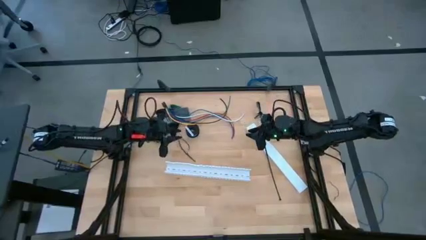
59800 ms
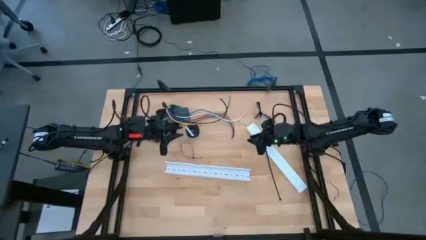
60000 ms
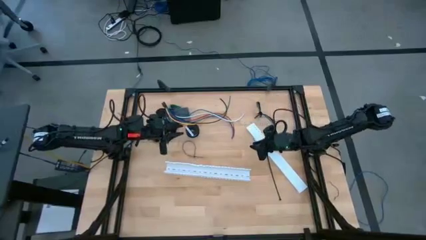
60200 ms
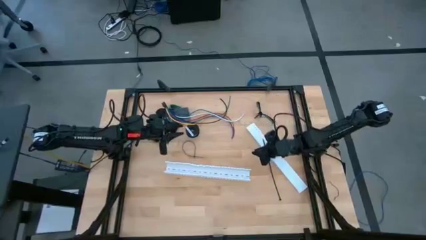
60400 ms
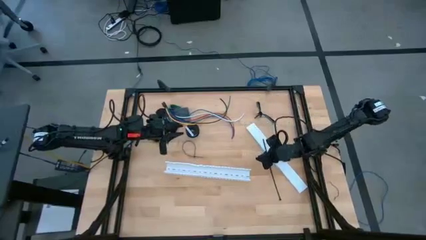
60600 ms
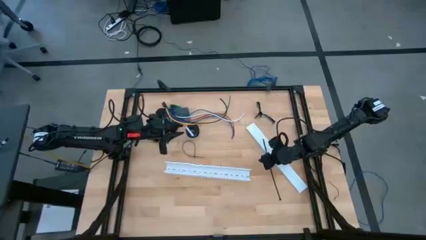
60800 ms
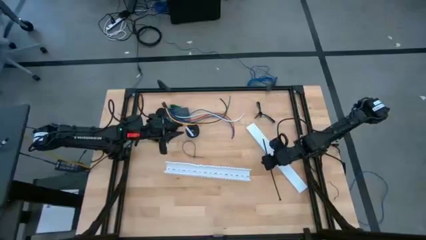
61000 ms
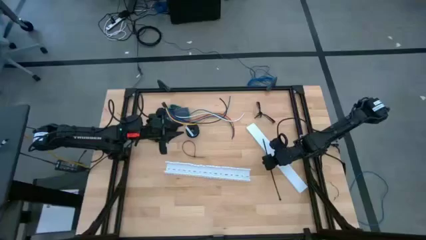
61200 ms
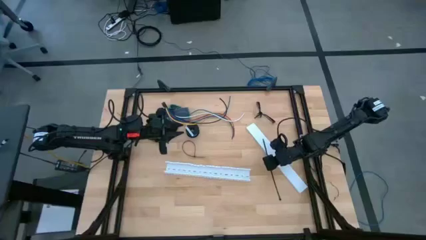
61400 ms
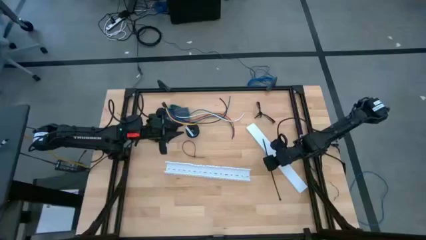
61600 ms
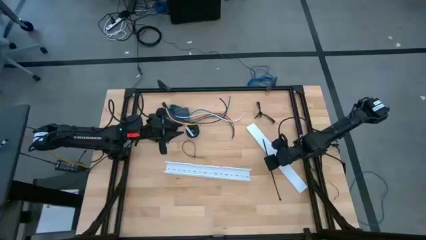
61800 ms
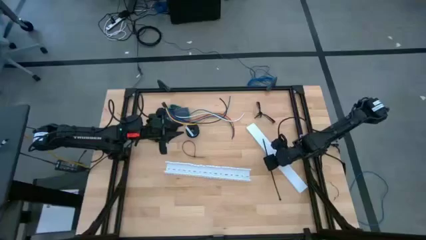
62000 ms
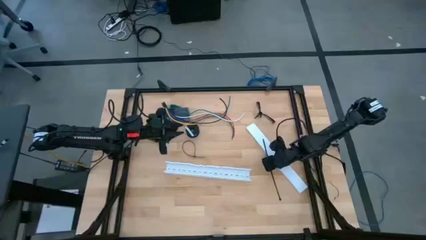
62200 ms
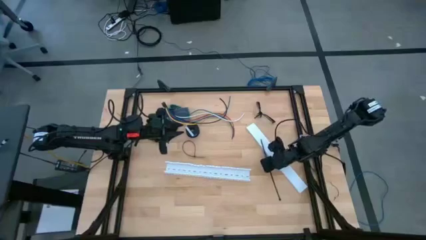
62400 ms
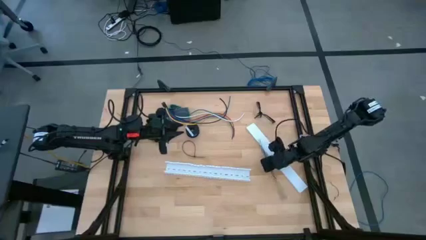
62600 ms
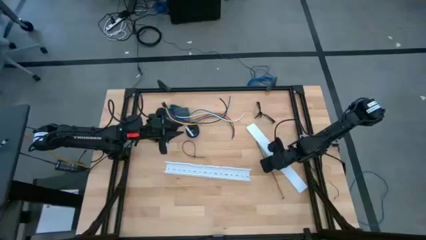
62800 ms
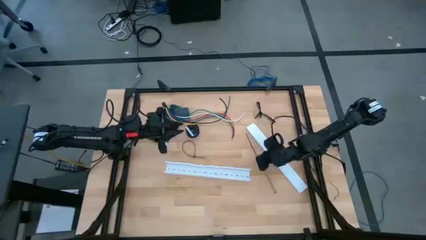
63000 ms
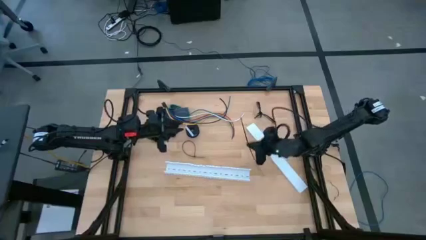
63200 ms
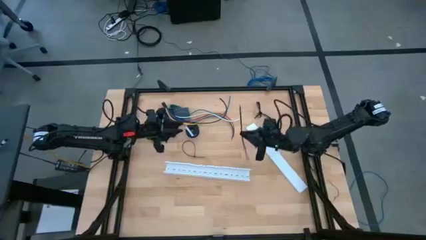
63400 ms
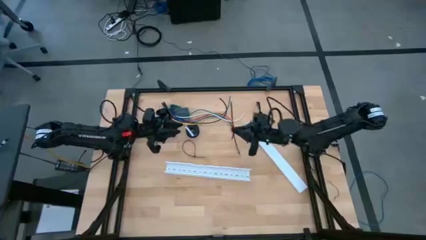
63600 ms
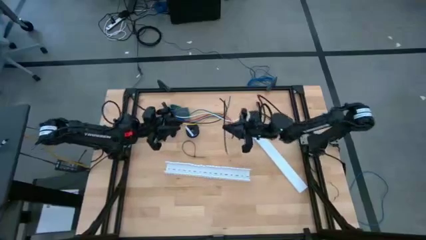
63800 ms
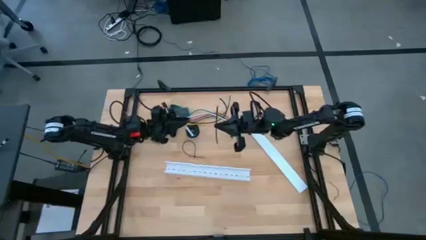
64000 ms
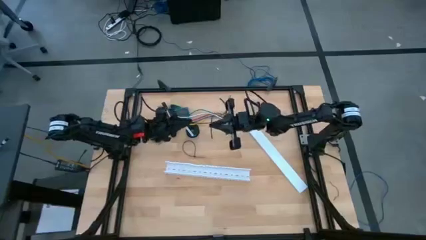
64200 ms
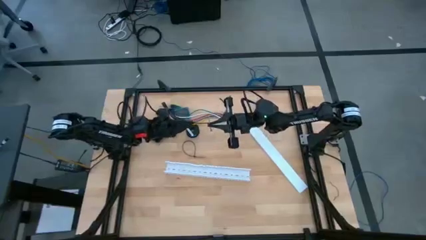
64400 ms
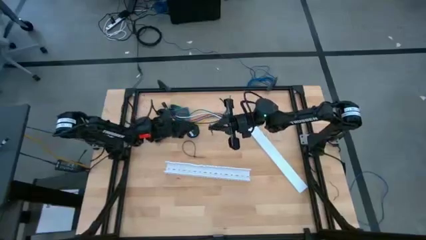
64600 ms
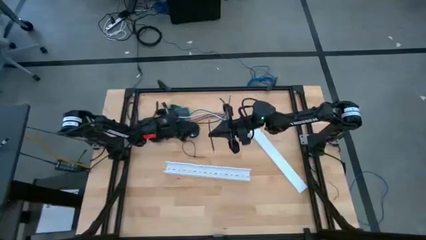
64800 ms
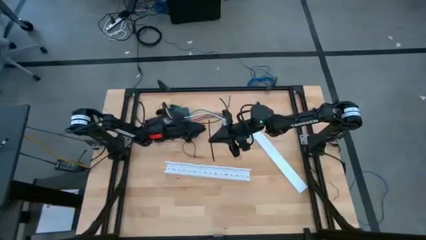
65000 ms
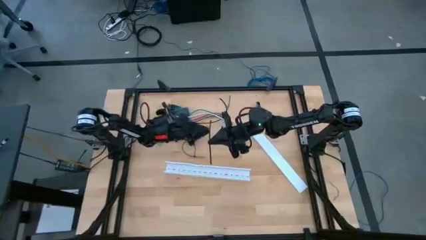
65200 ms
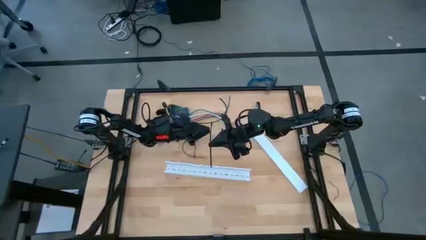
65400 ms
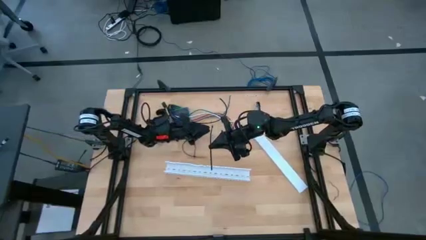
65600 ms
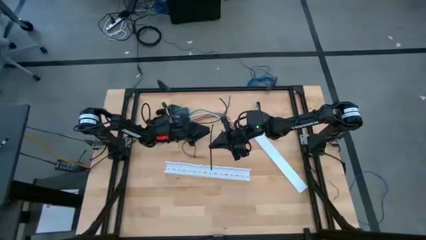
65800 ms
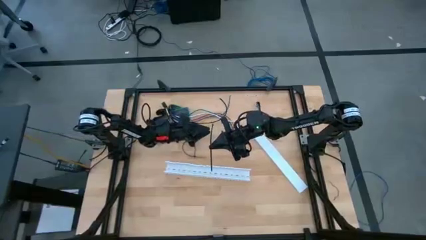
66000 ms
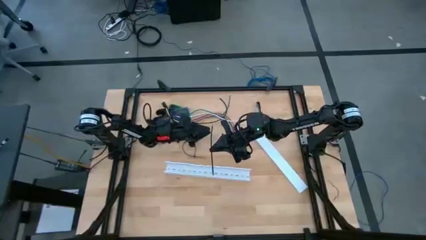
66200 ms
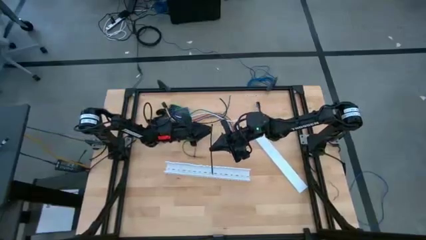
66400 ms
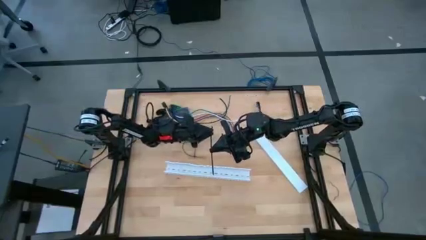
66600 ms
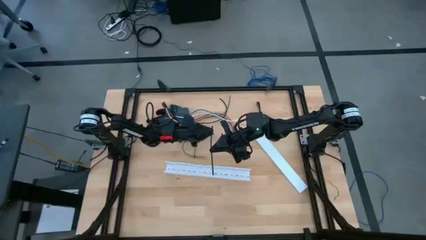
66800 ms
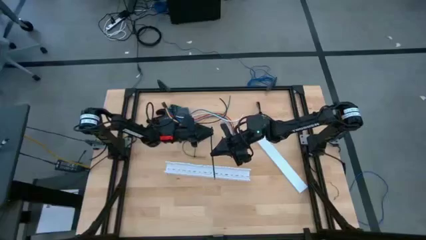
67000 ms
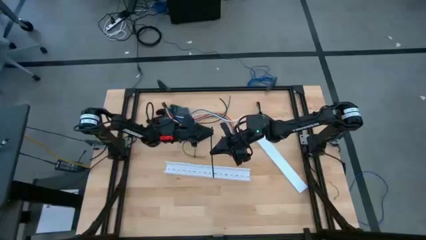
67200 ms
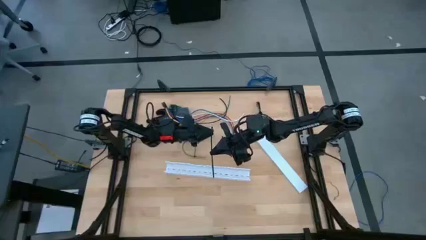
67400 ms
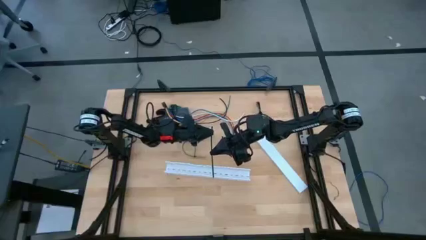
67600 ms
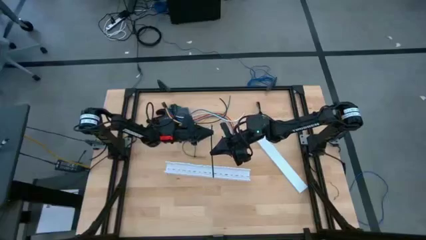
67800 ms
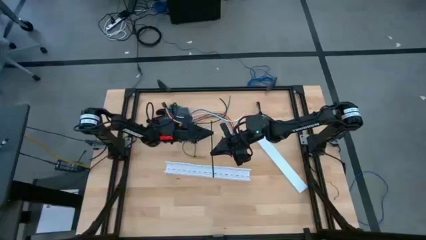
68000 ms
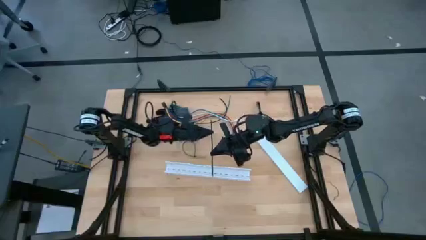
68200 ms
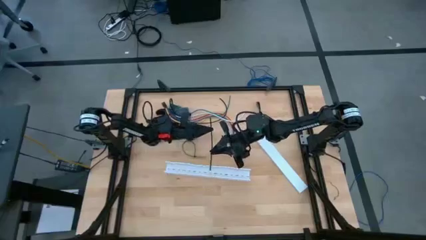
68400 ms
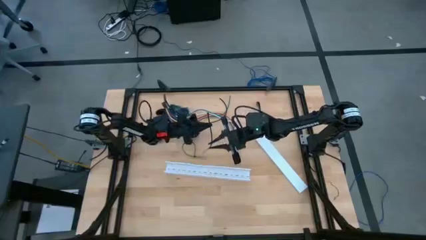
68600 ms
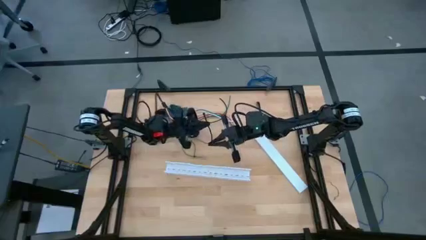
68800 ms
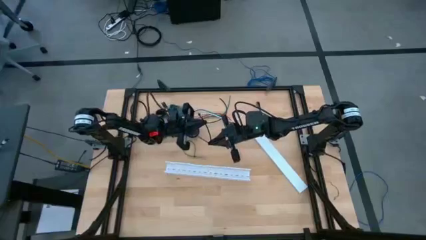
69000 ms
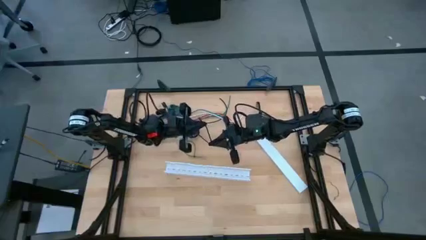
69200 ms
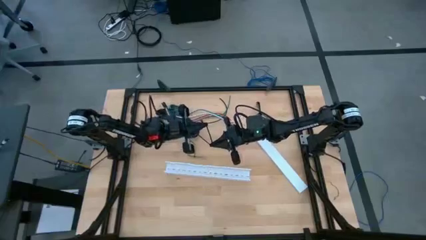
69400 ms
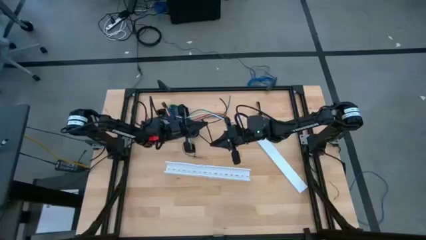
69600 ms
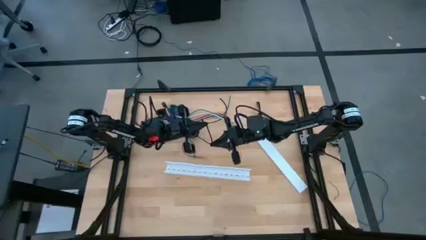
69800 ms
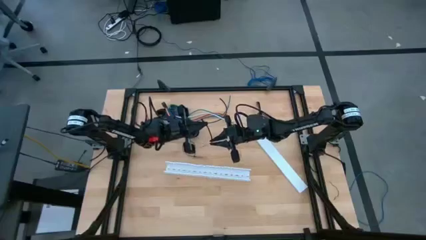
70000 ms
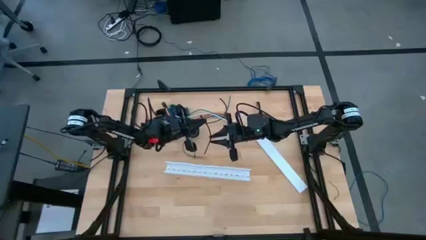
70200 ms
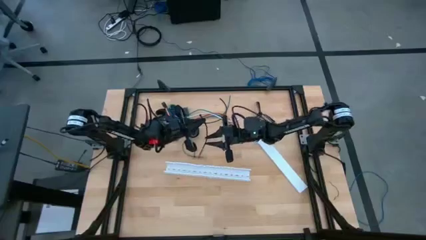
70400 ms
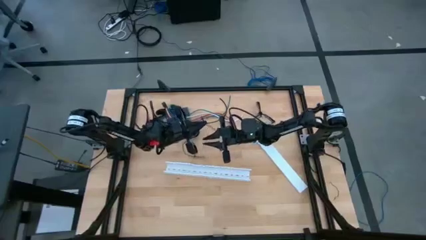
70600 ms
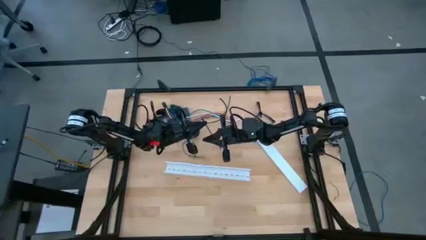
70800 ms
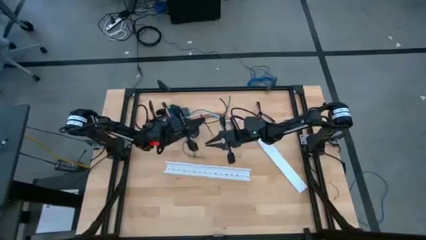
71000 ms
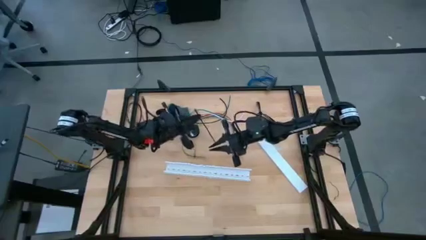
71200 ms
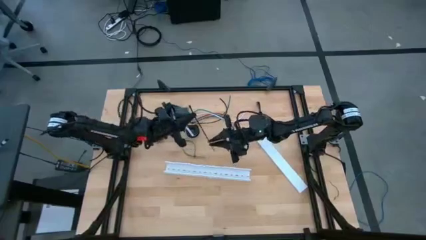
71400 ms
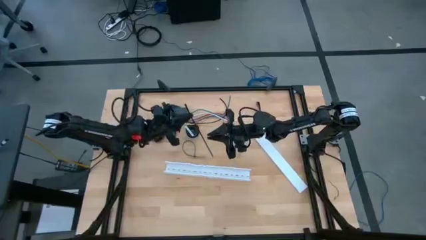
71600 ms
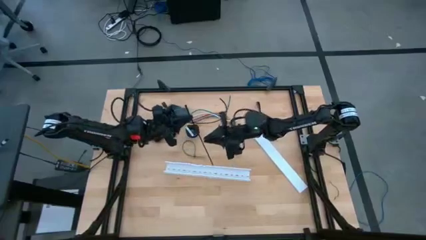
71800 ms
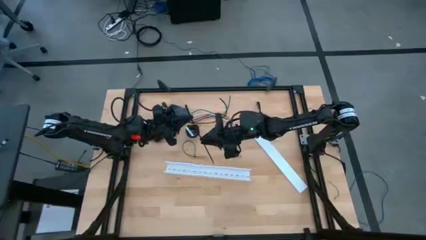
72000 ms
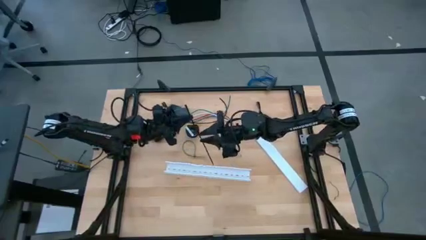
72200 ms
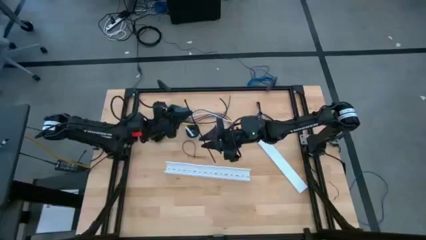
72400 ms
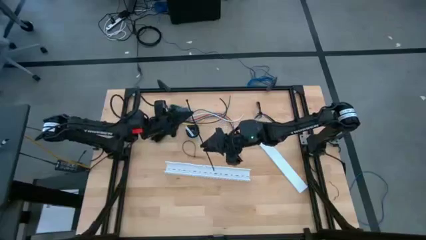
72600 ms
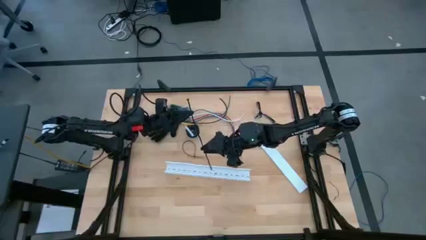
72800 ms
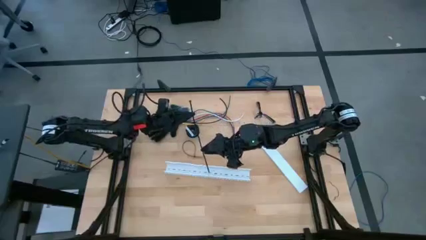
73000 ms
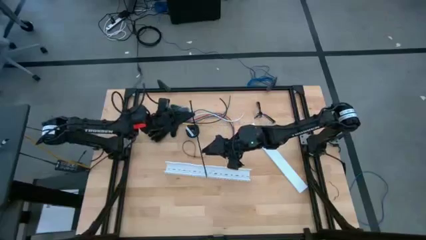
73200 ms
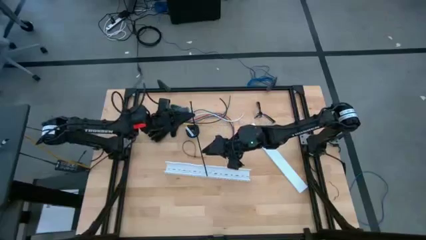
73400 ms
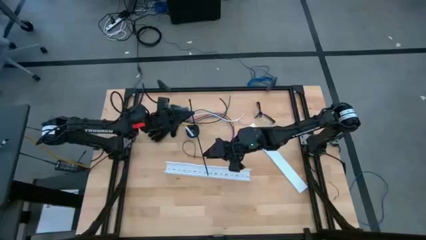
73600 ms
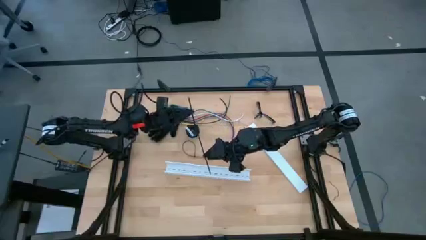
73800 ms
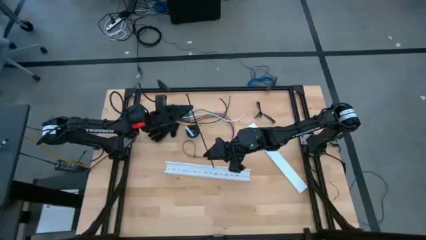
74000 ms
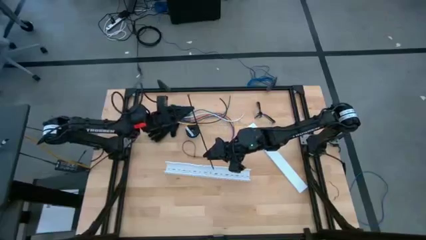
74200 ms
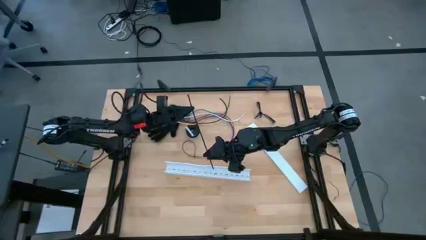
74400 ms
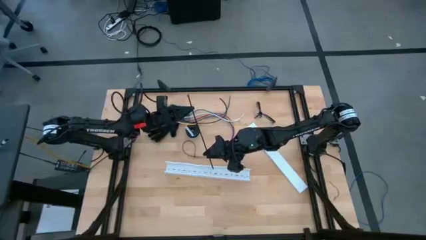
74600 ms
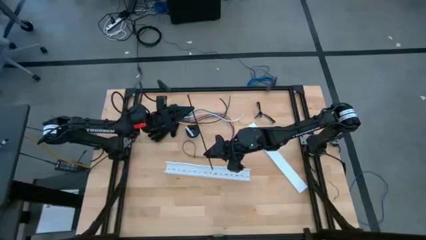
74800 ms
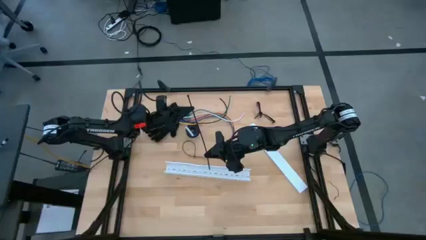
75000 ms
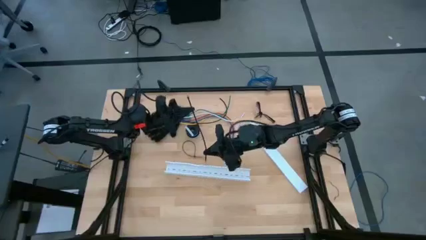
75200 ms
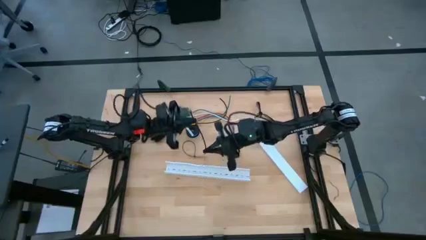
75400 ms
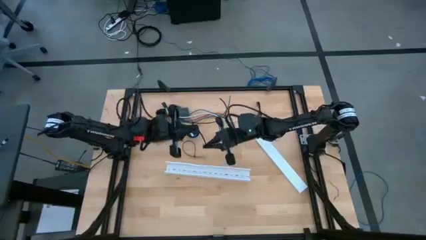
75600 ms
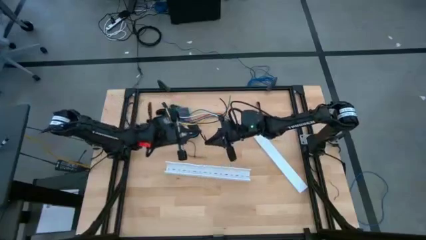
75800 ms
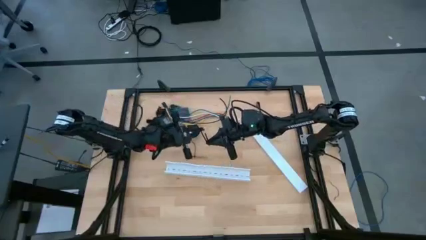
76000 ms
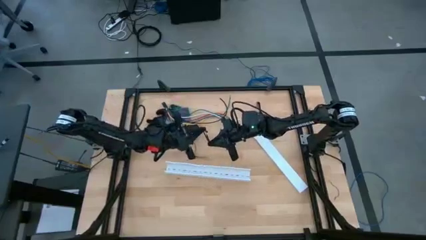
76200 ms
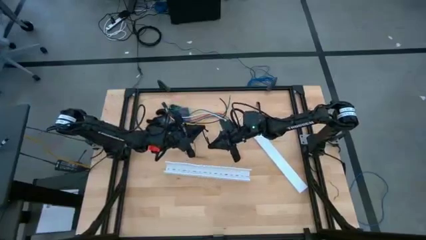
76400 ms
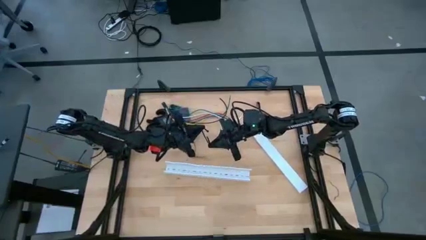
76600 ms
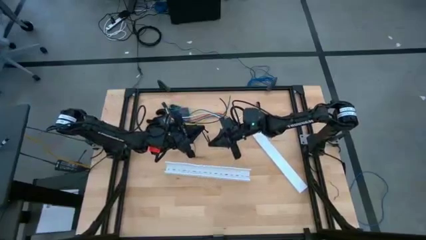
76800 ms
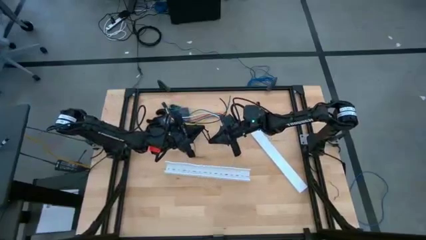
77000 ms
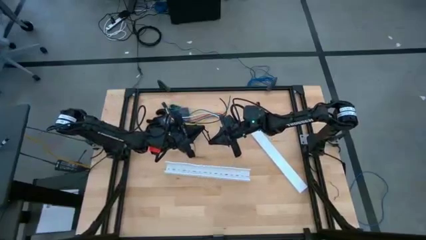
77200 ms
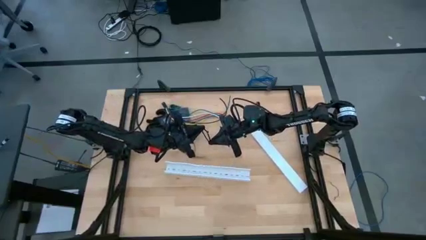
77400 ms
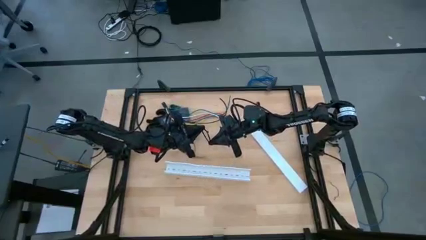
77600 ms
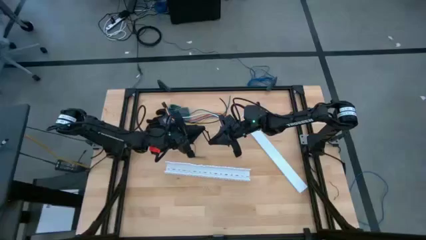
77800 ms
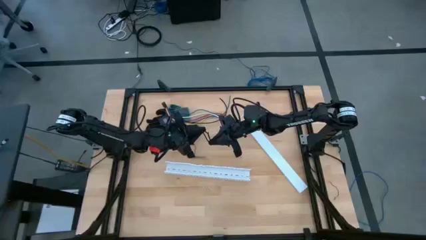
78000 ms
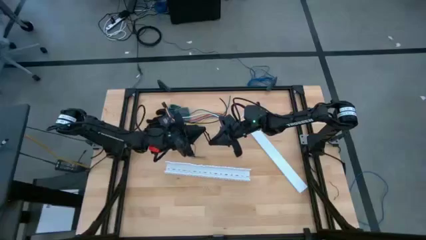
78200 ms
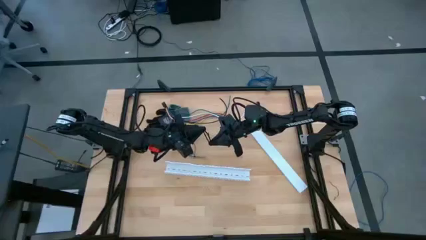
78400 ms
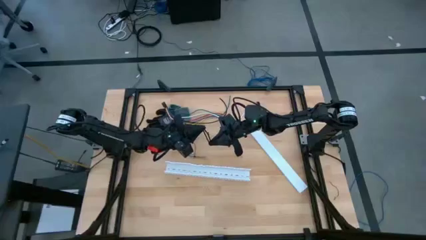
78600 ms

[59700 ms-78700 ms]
Task: Ziptie cables
Wrap the cable wires with the black zip tie
